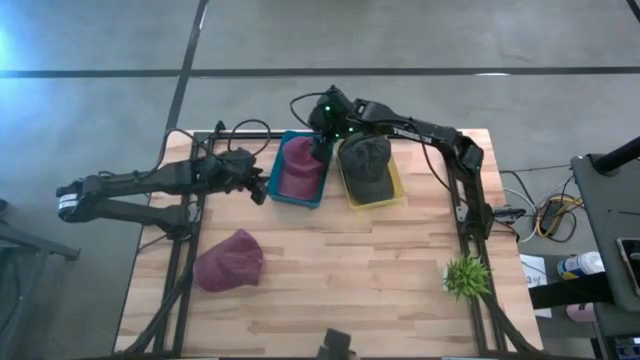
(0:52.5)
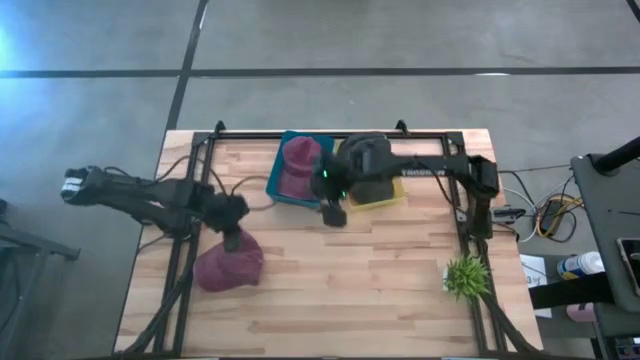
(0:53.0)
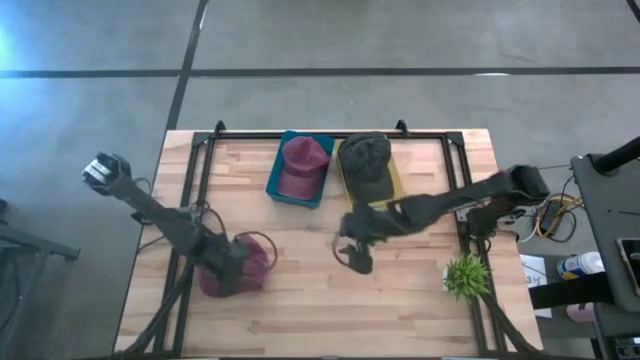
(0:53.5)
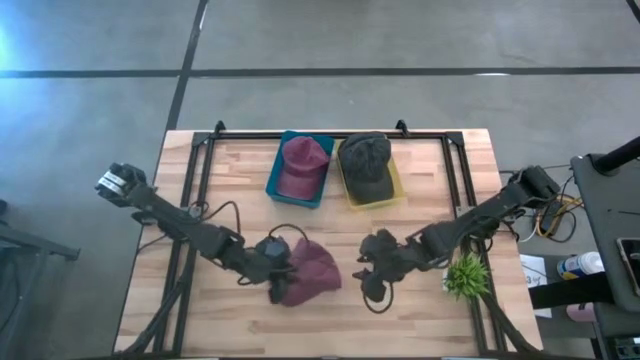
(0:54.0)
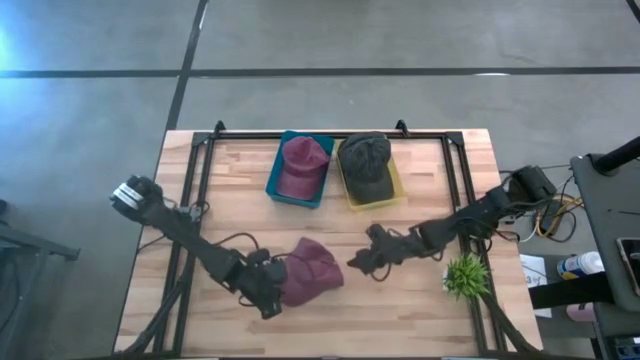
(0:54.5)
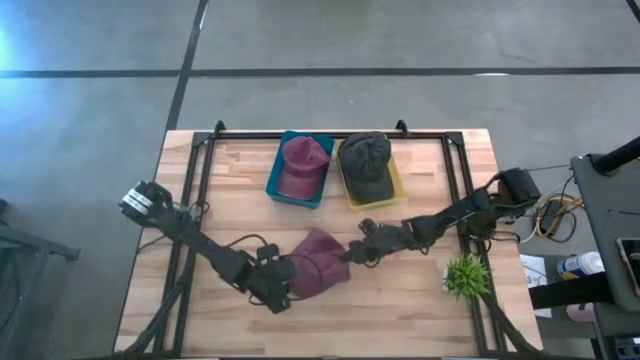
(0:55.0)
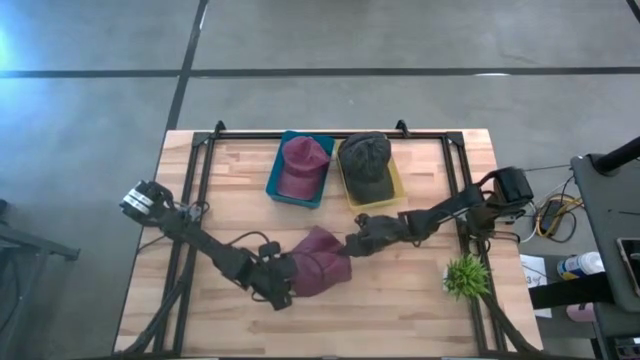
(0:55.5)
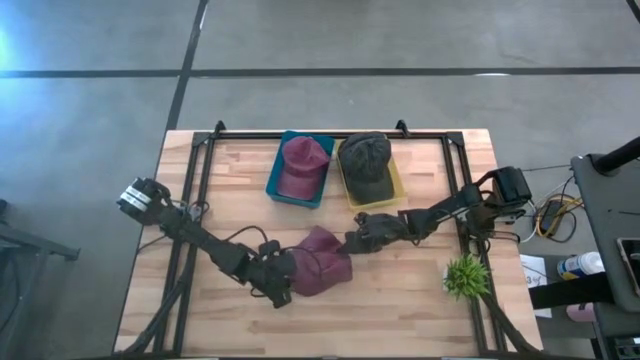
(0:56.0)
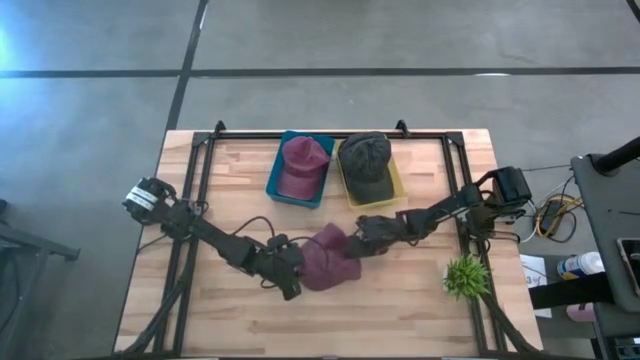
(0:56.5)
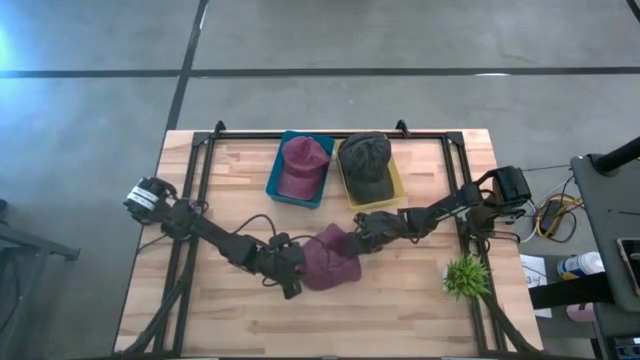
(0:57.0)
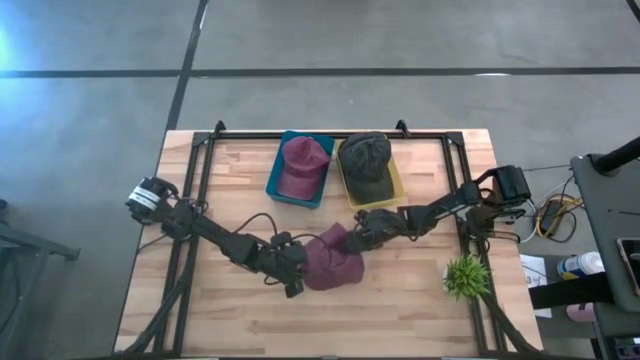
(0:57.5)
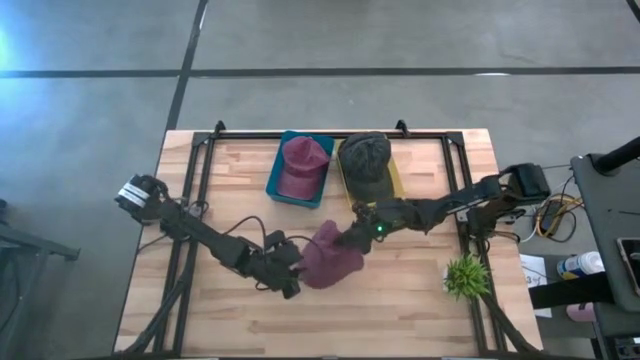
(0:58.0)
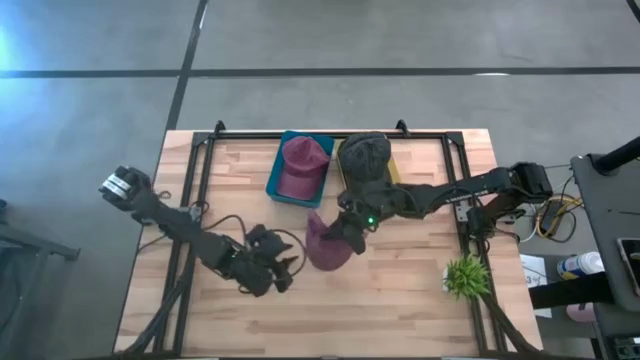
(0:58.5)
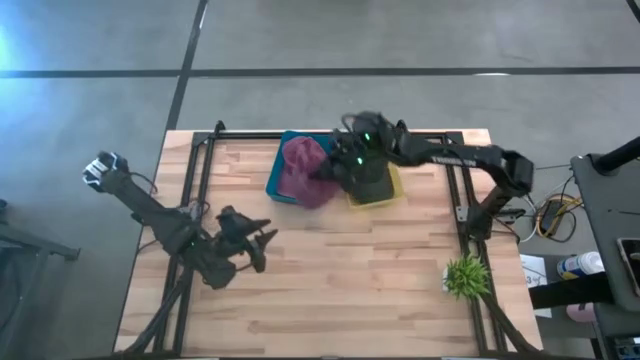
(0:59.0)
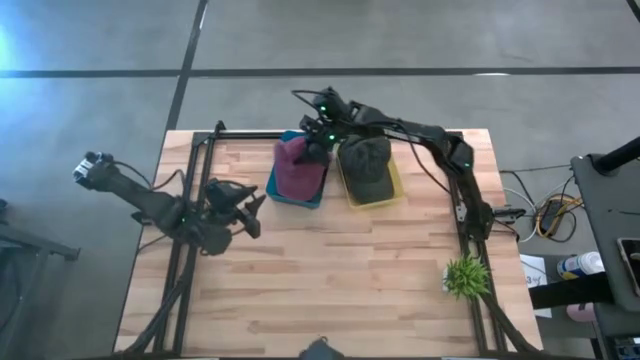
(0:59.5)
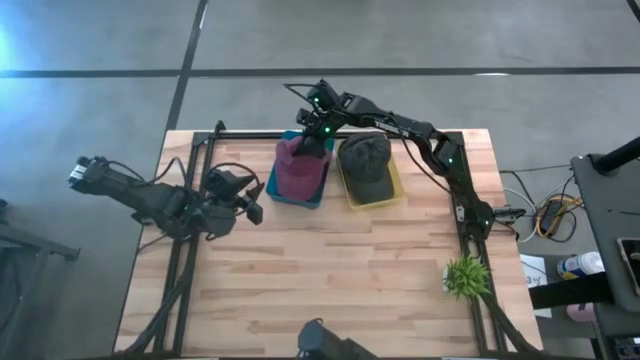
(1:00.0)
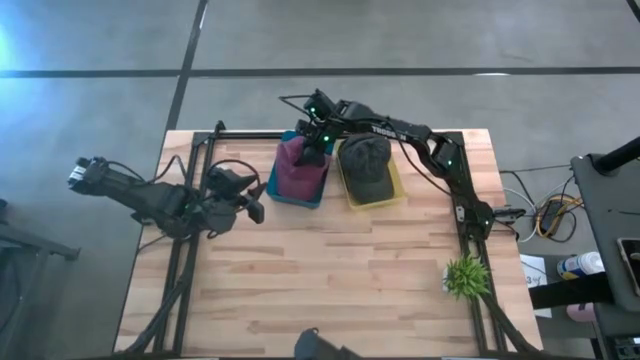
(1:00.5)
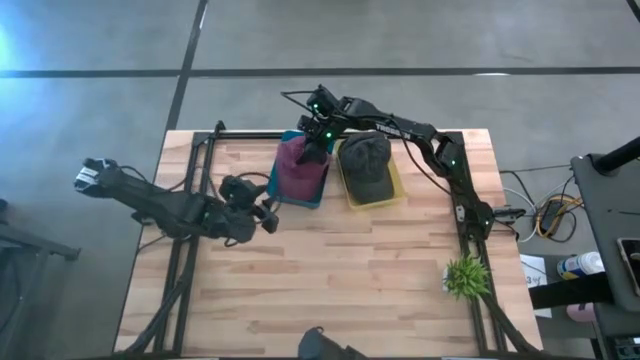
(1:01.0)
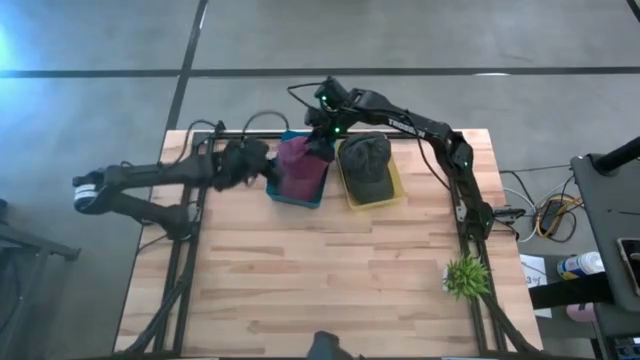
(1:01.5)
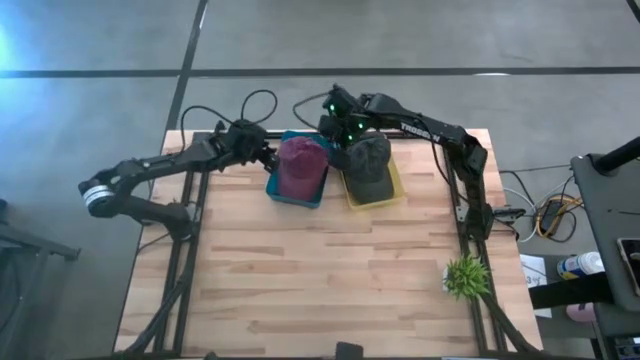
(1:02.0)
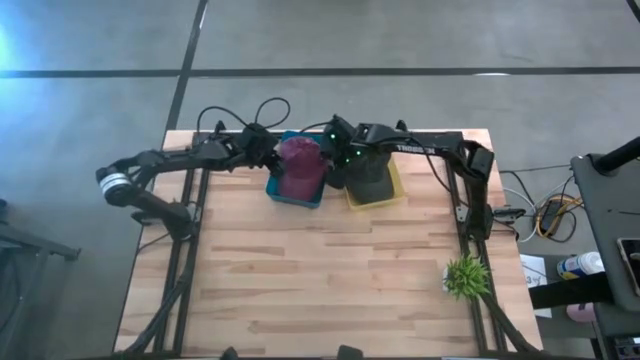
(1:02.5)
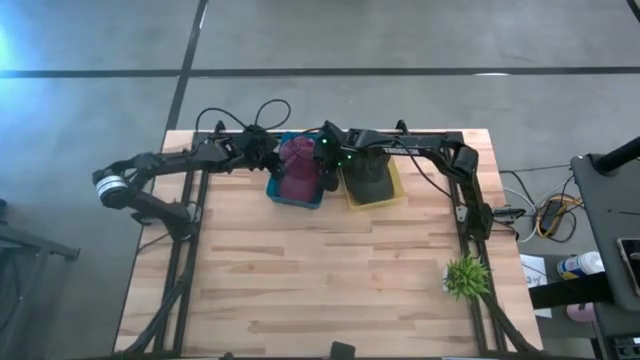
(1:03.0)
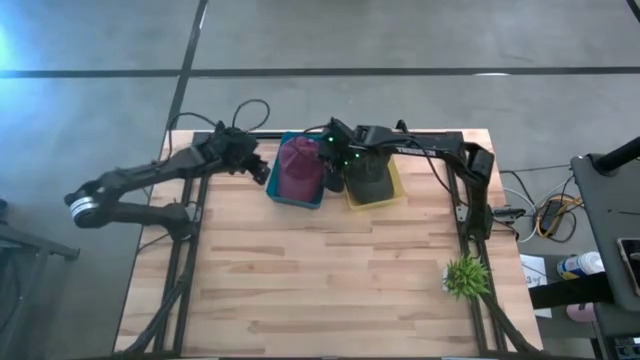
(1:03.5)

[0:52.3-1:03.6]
Task: Pick & Place hat
Put the pink cap into the blue bin

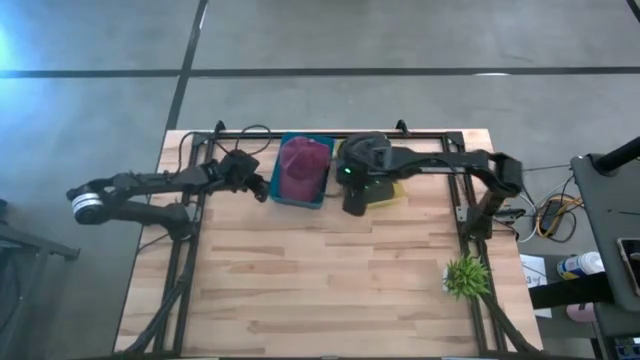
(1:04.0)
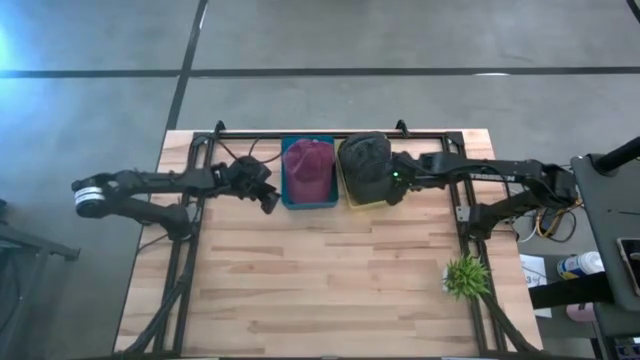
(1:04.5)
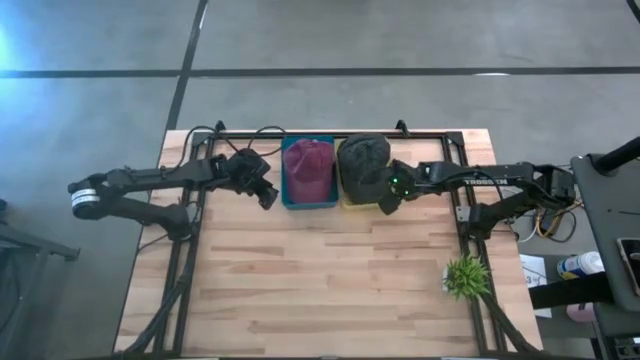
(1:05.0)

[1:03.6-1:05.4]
Adjust the bins on the table

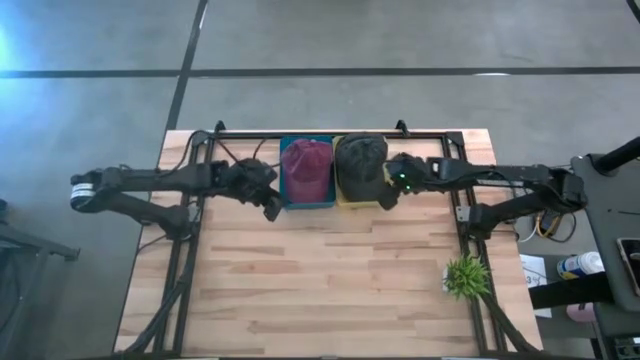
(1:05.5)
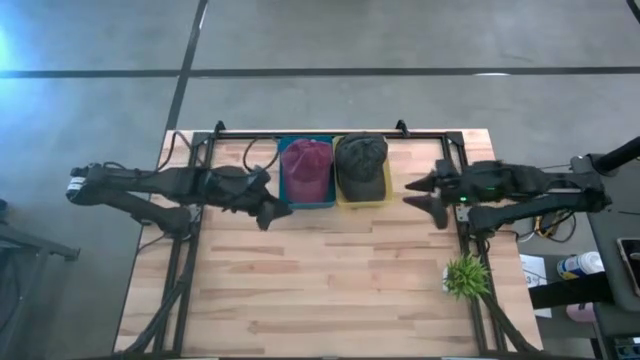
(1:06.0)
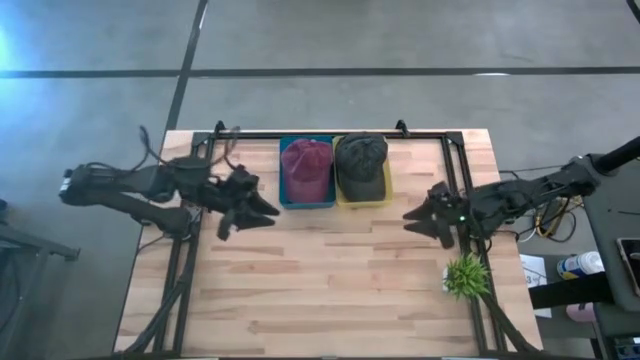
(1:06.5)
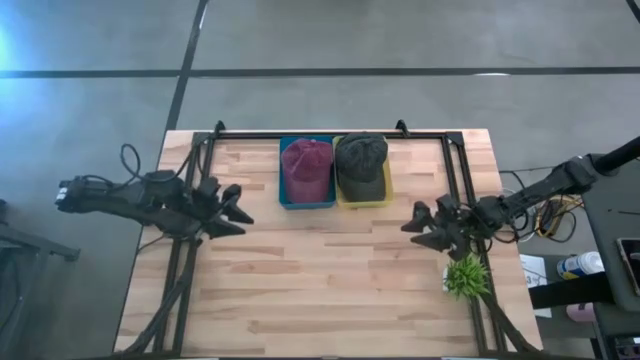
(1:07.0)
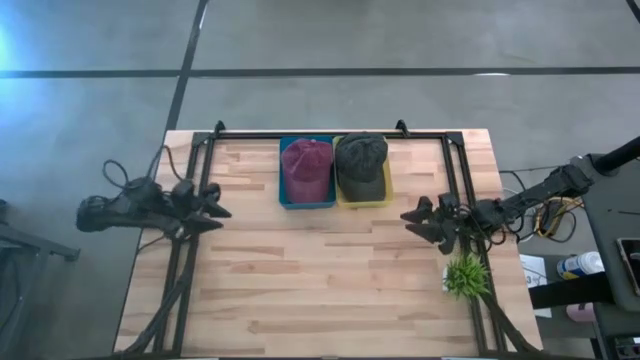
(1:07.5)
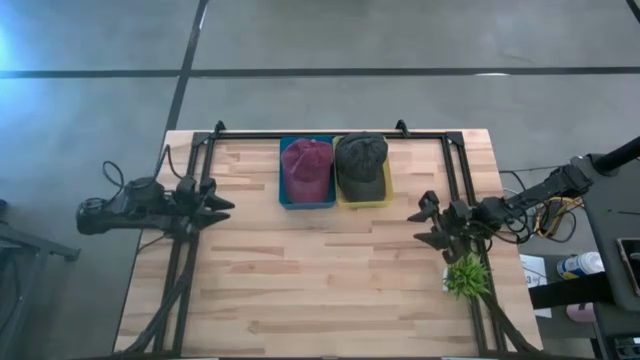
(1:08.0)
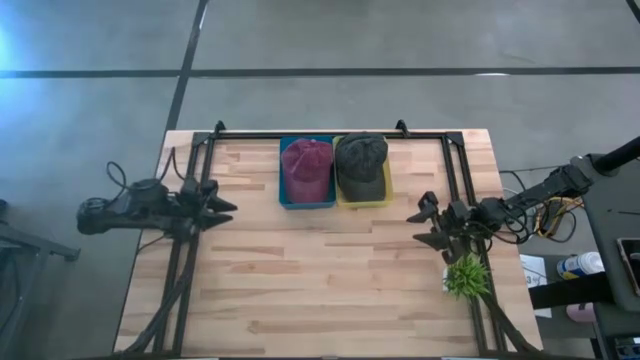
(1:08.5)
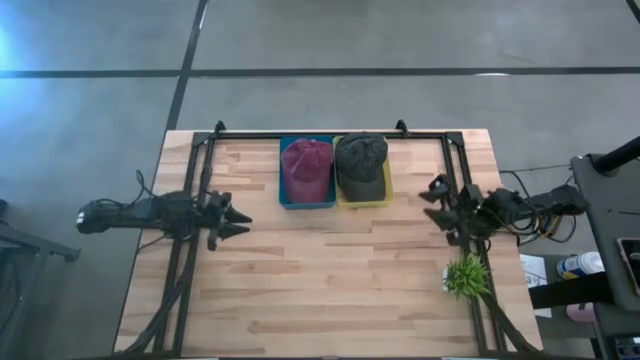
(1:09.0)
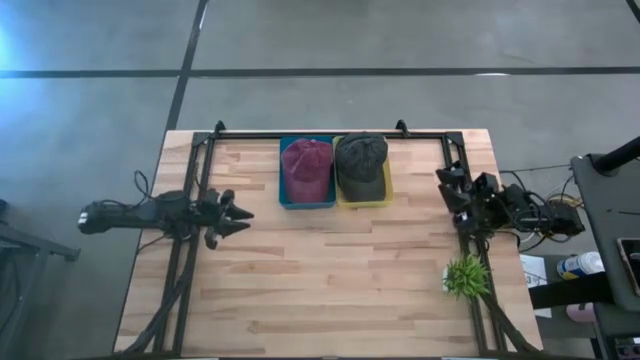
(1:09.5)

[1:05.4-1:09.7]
Return to Home Position

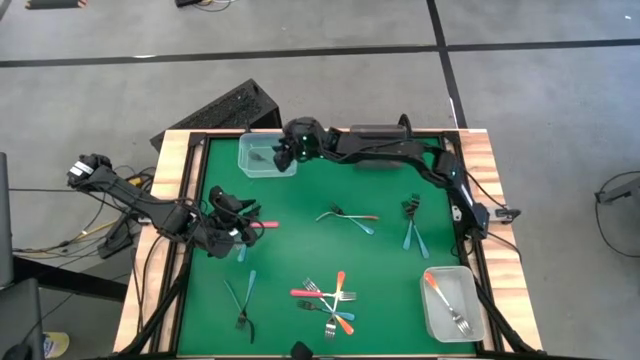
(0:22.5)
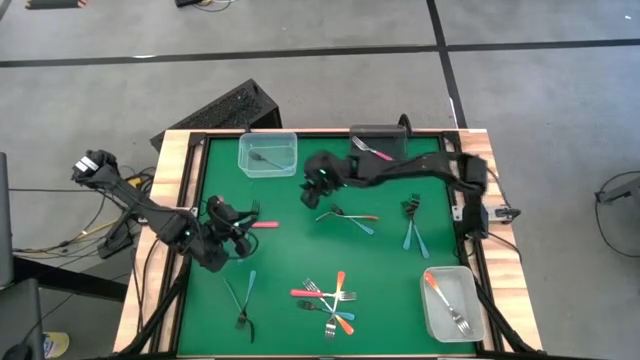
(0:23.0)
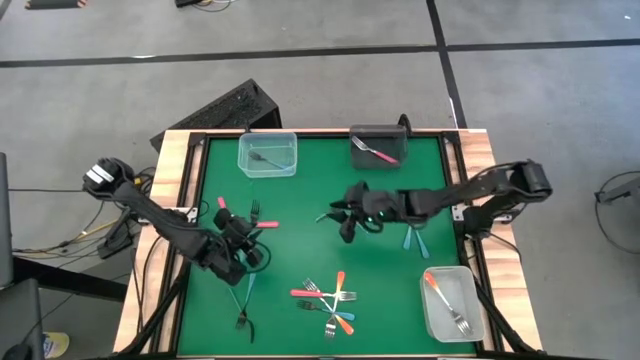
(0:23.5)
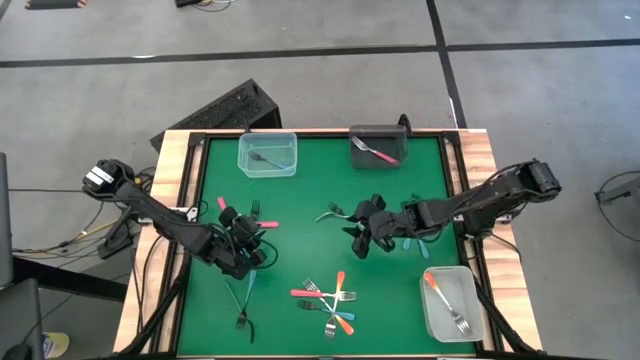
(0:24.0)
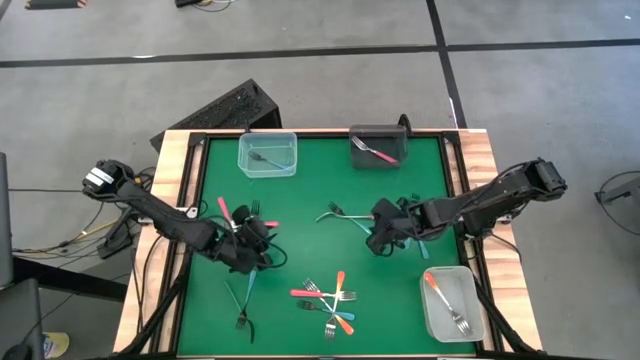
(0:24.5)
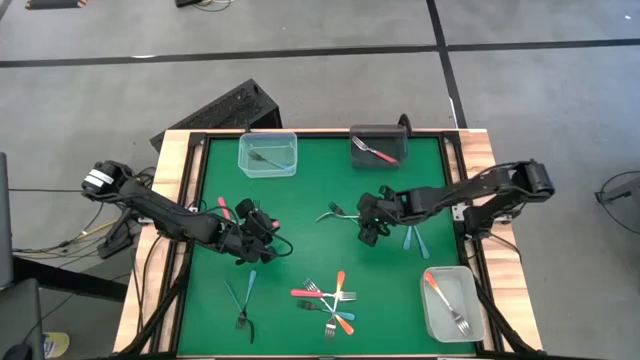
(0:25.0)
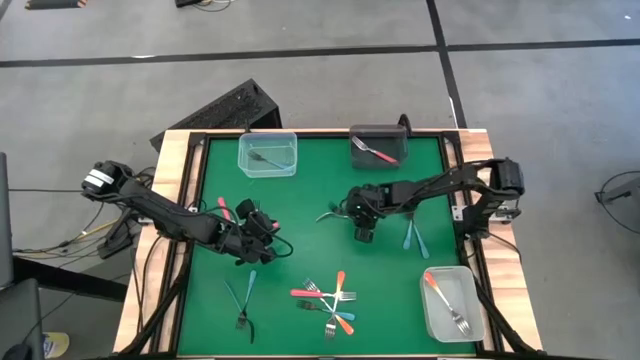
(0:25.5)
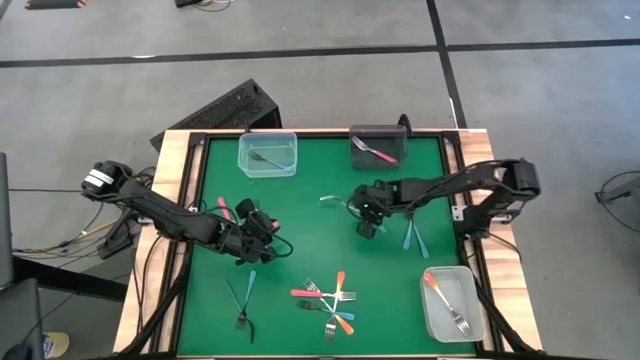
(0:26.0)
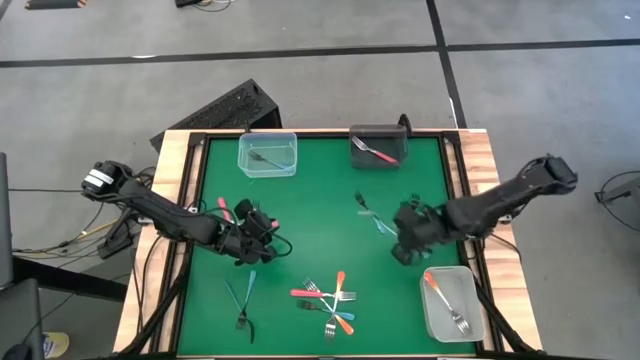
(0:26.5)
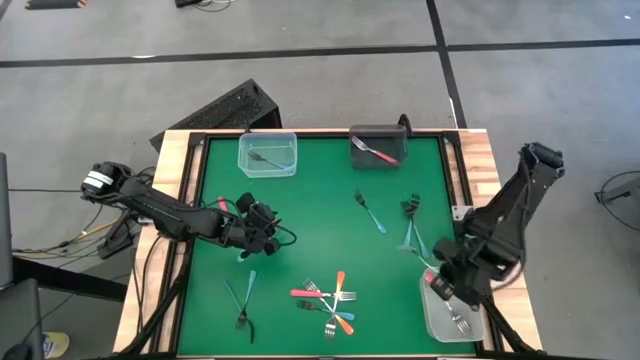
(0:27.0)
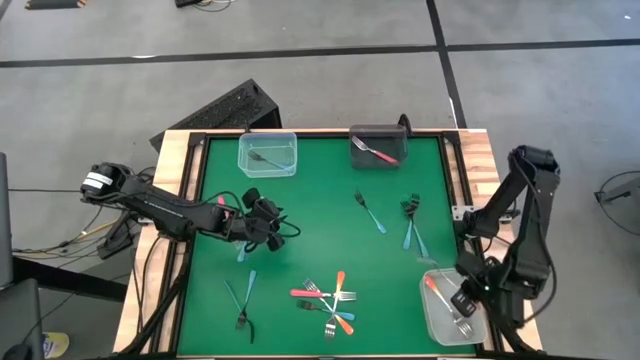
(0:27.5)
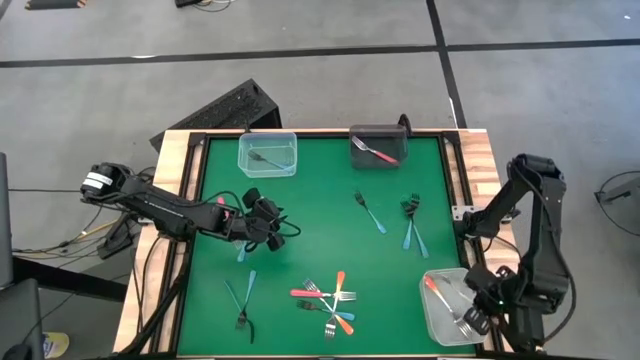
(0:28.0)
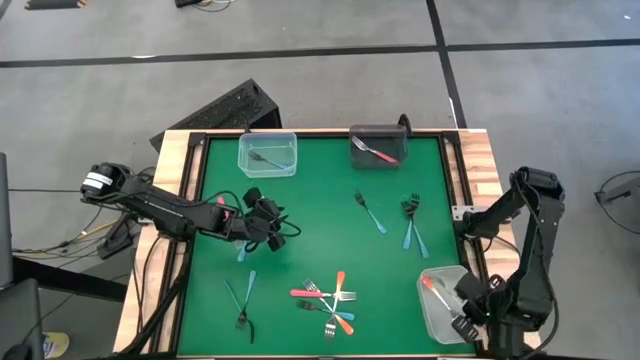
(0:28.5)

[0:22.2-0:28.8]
Task: Sort silverware by color (type)
Put the orange fork into the white bin
